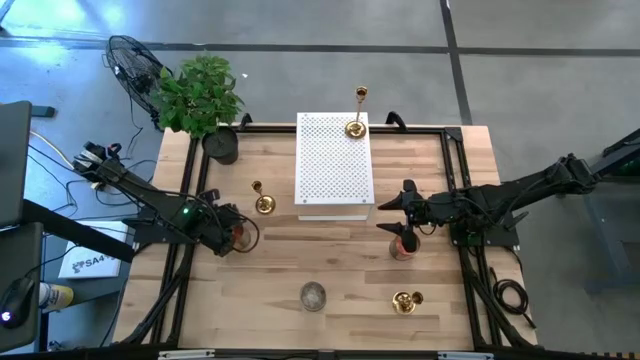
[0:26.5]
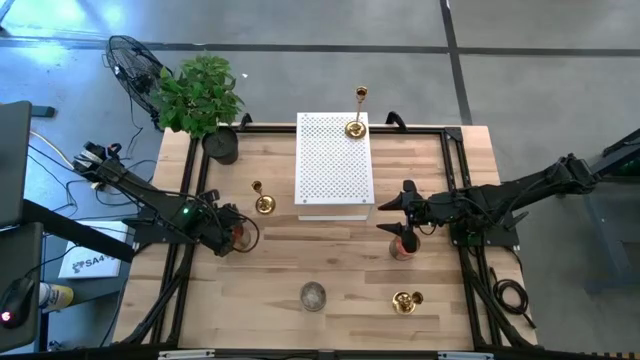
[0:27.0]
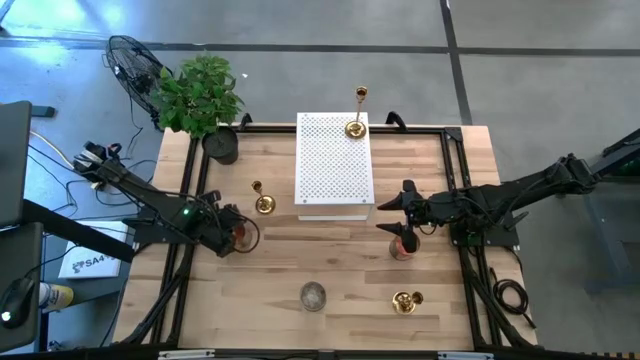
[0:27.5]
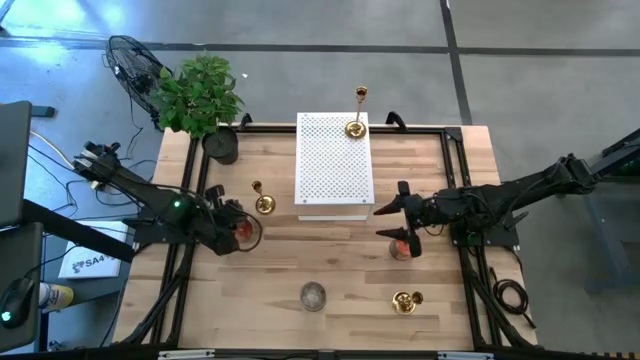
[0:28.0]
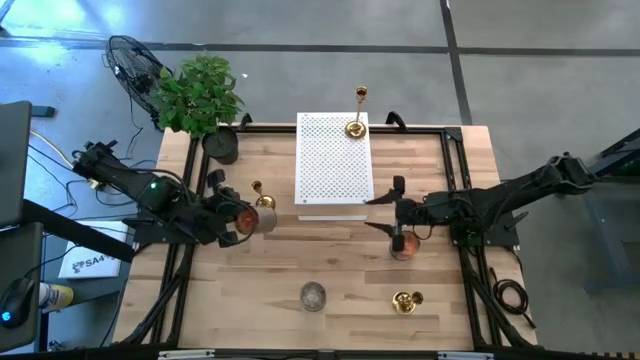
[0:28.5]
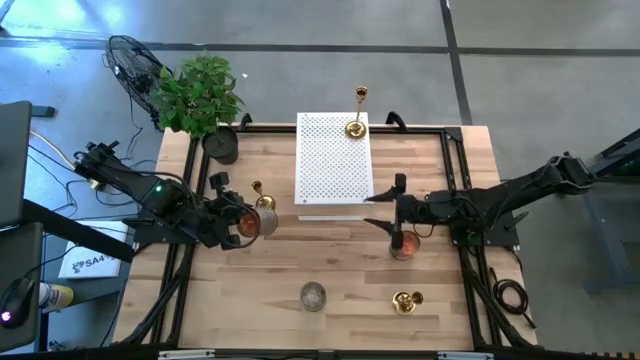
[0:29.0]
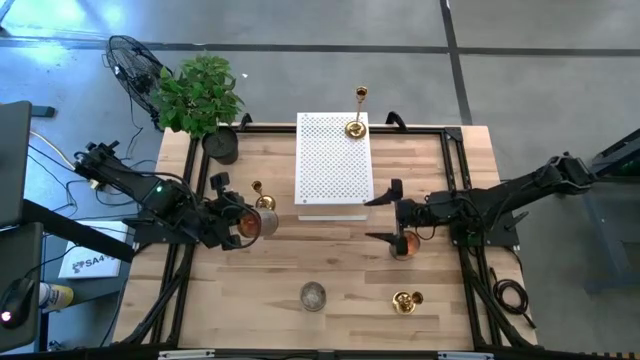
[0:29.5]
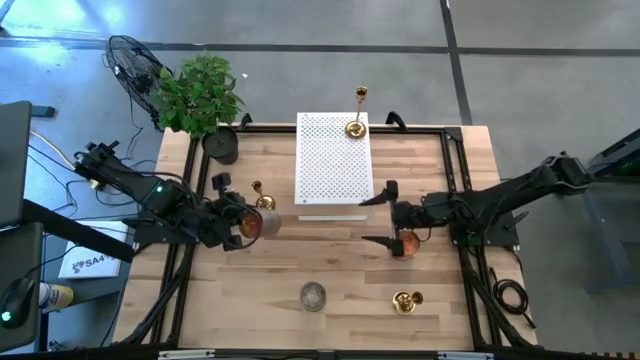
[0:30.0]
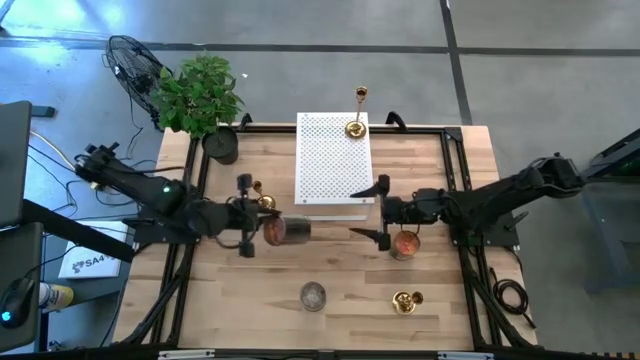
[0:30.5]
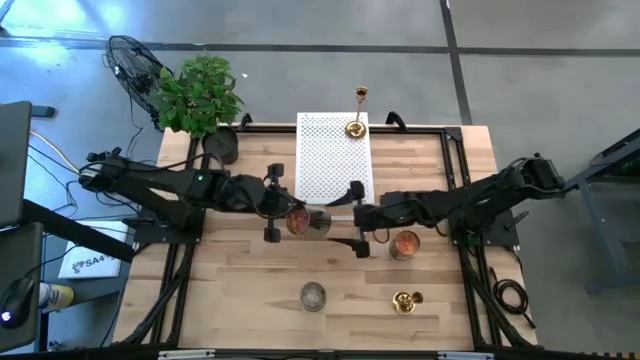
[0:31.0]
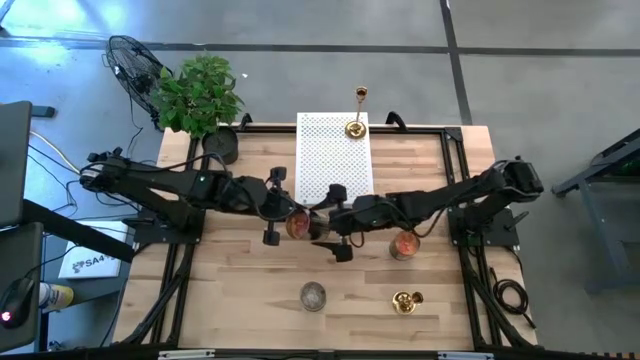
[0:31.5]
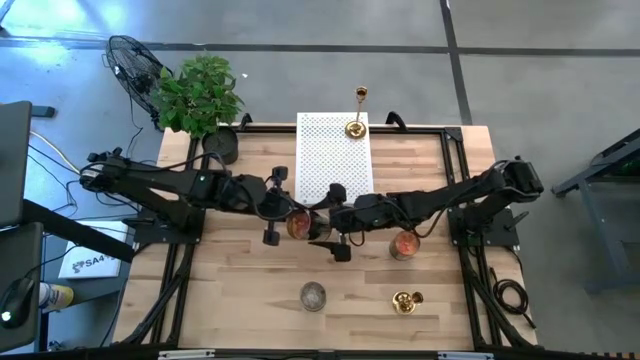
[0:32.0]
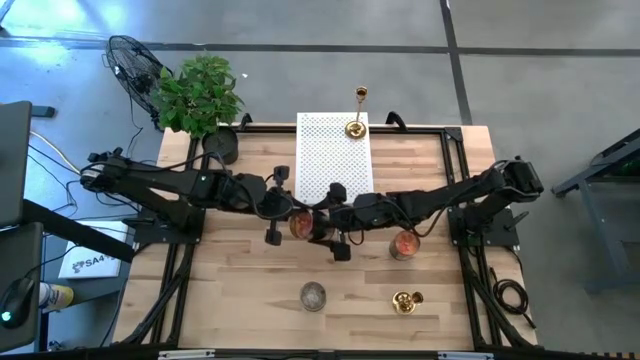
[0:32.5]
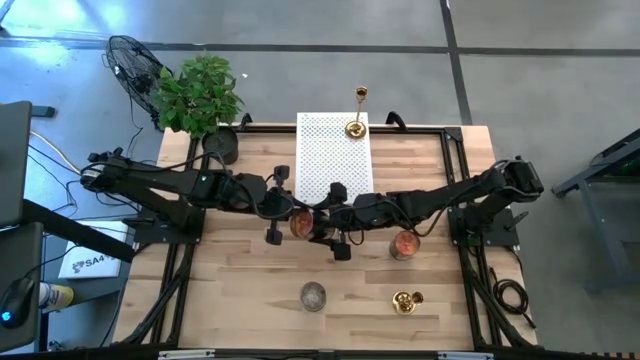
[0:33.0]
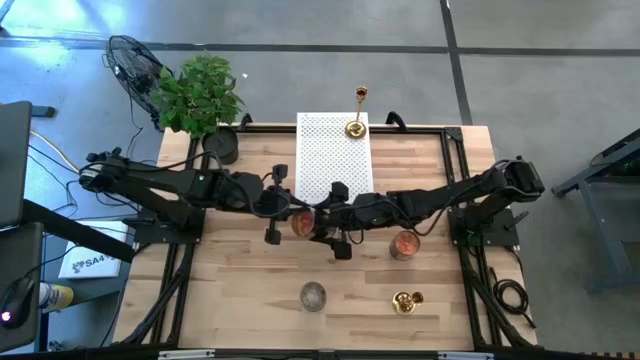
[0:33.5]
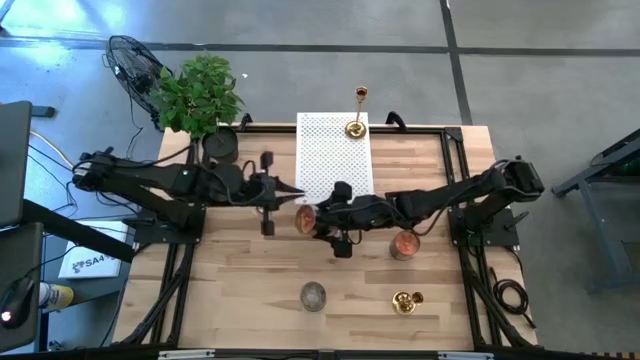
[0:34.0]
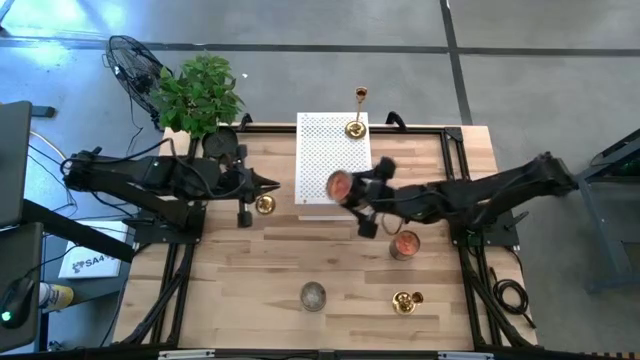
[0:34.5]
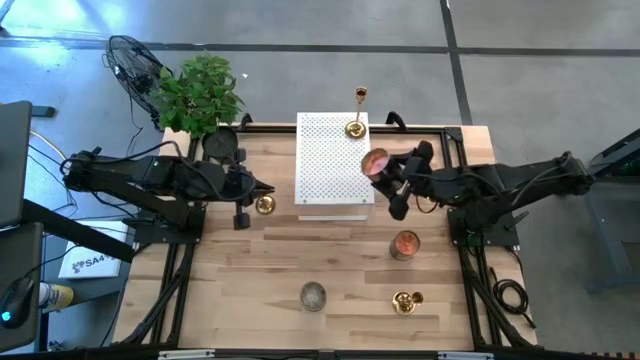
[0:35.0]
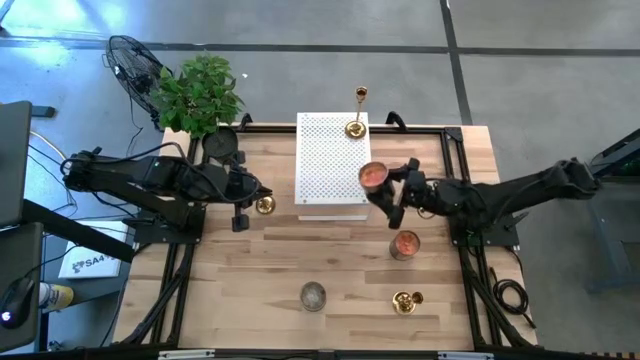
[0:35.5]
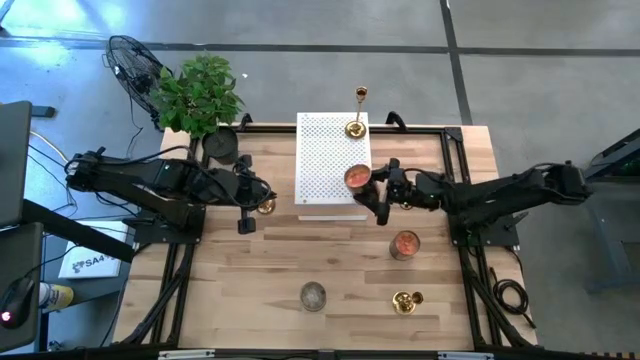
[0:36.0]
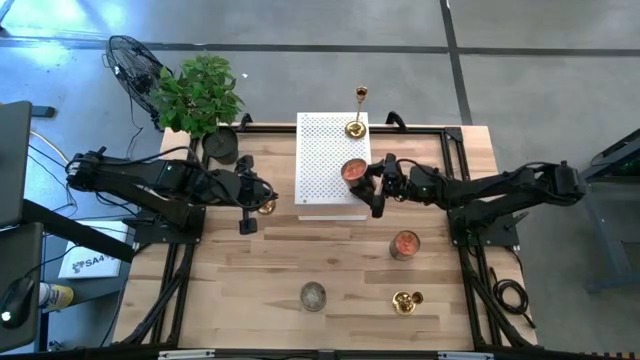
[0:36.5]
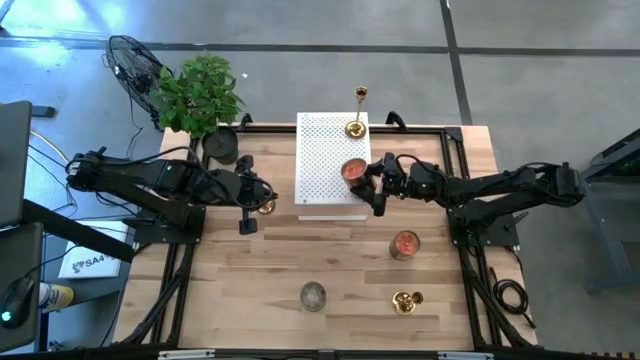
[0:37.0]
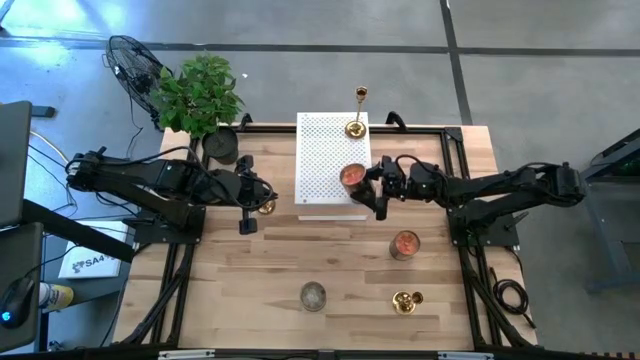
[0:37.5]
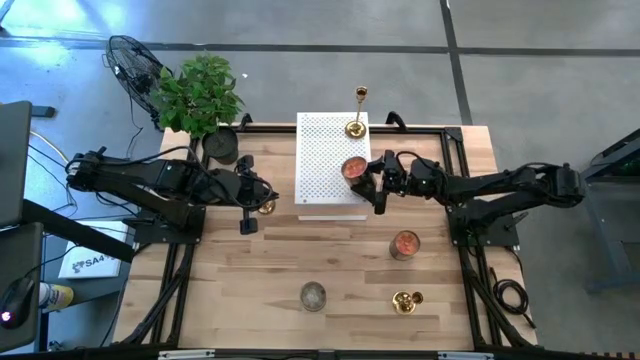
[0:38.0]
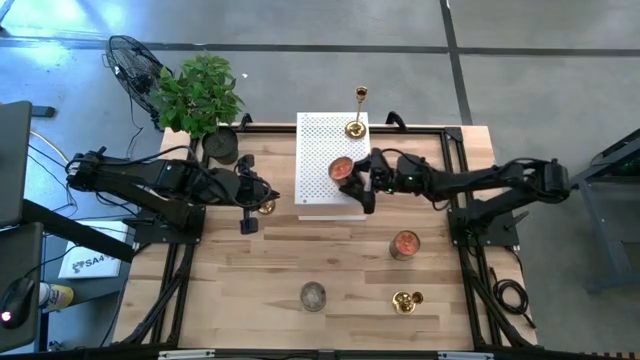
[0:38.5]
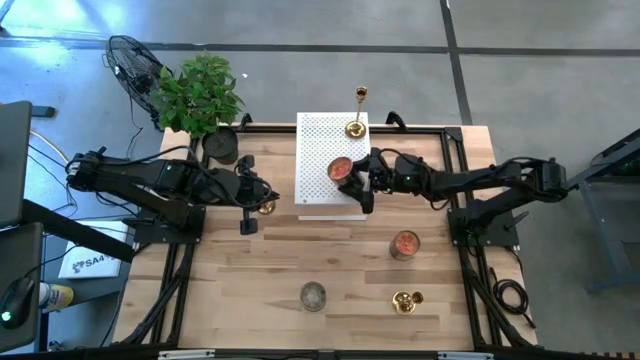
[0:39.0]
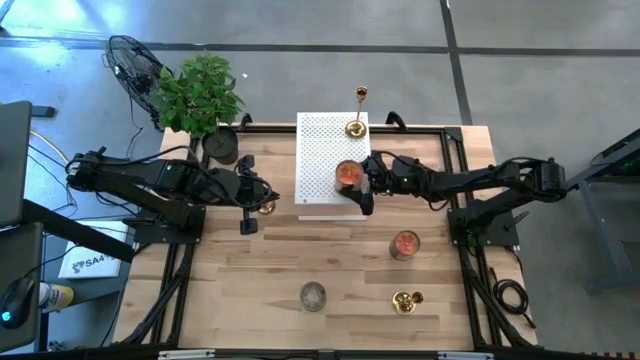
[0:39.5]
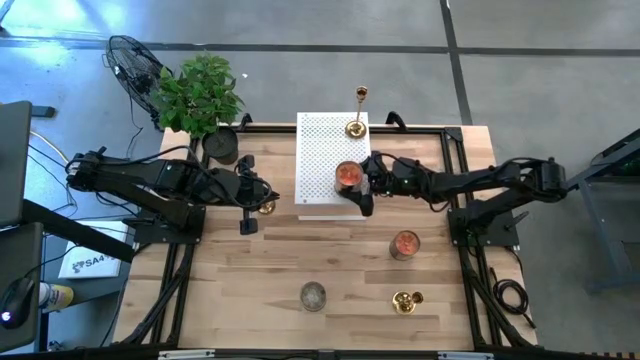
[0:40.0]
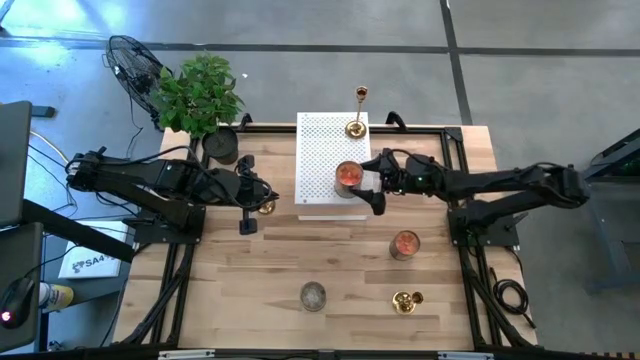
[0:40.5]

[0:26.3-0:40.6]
Task: Pick & Place candle stick holders
Put the left orange scented candle on the shelf

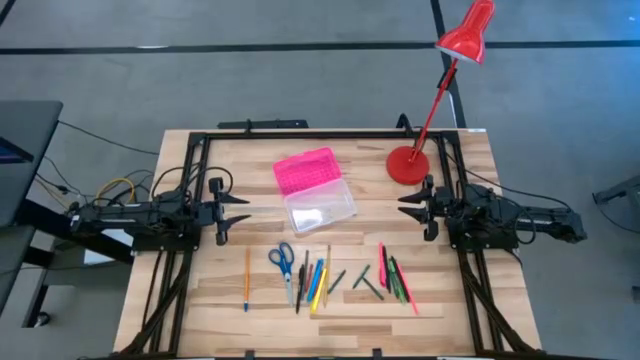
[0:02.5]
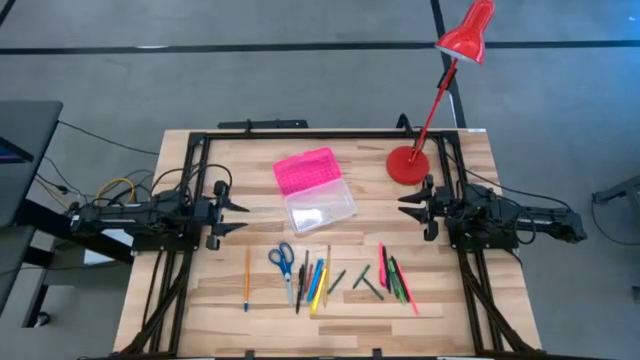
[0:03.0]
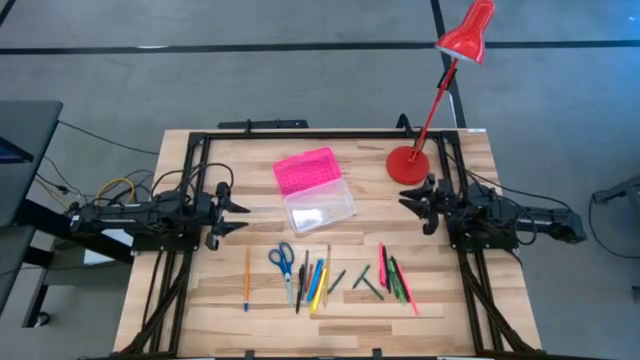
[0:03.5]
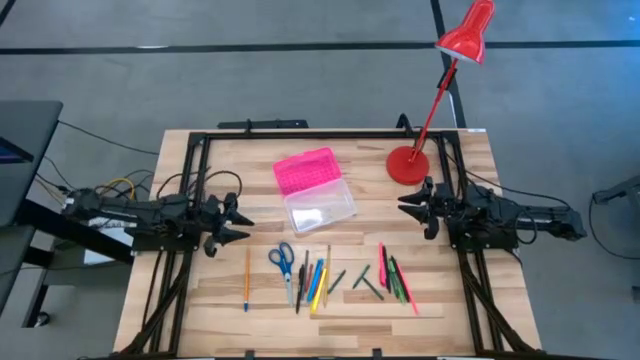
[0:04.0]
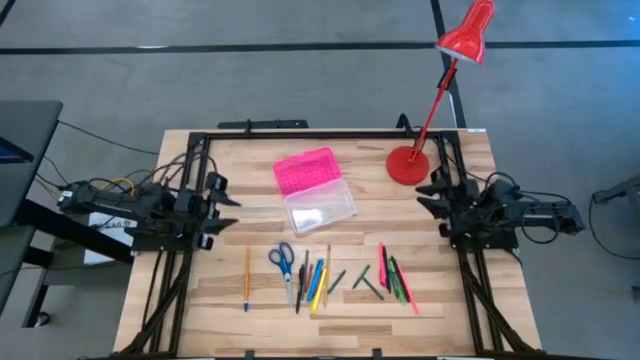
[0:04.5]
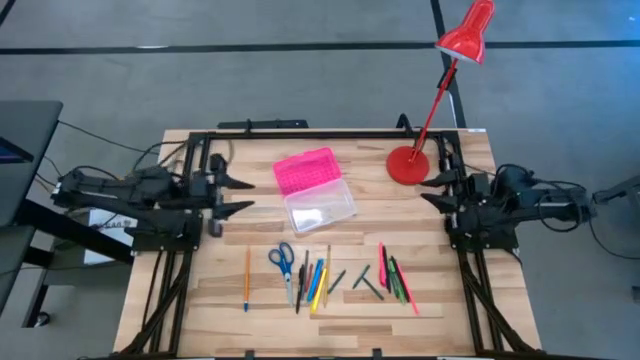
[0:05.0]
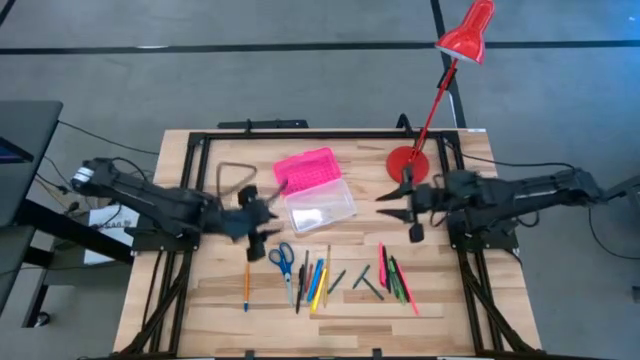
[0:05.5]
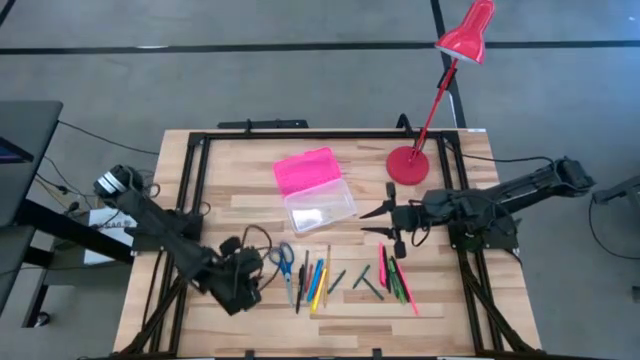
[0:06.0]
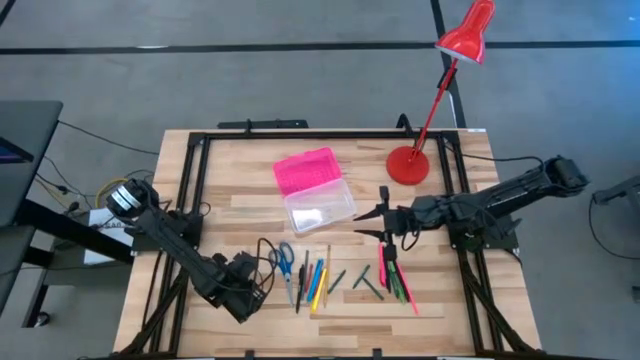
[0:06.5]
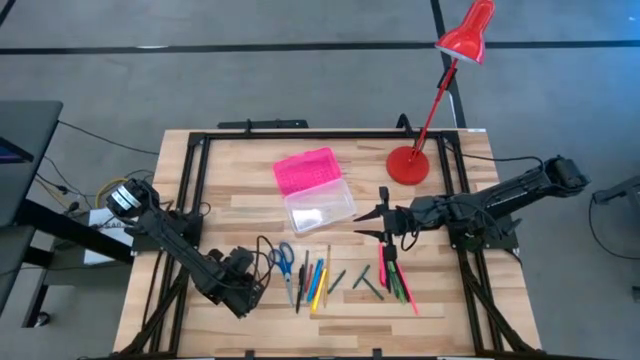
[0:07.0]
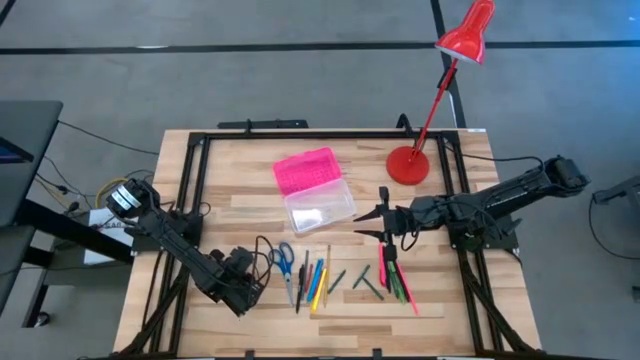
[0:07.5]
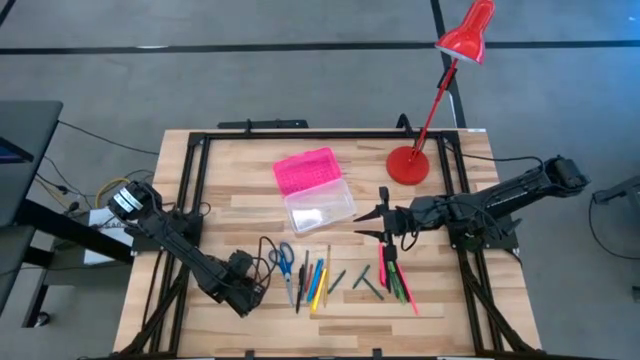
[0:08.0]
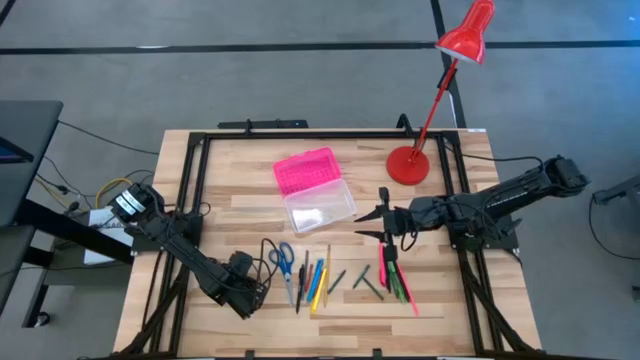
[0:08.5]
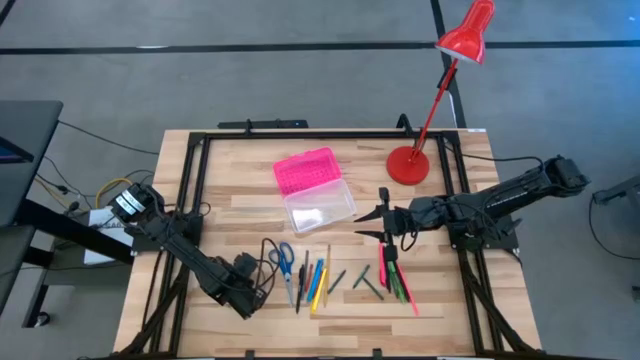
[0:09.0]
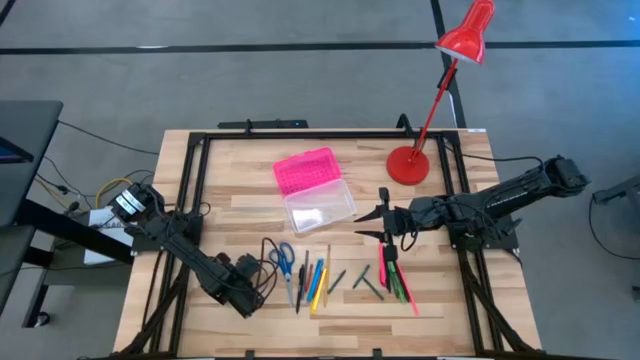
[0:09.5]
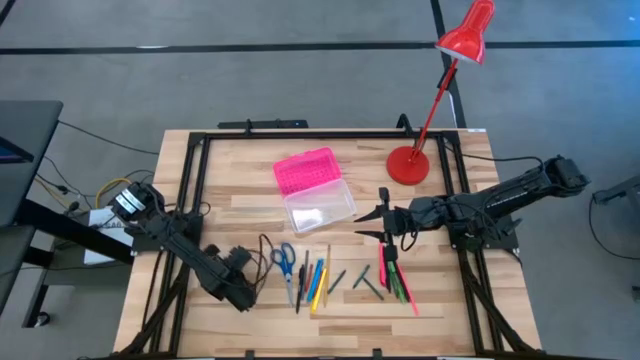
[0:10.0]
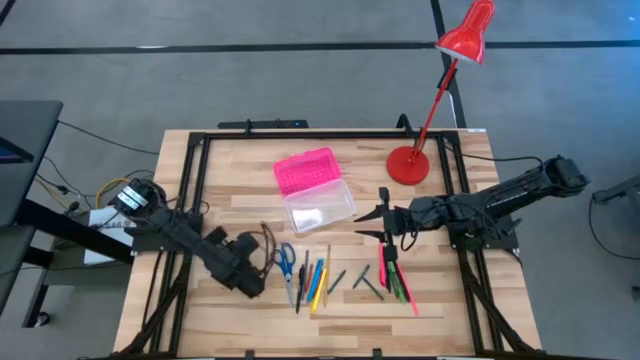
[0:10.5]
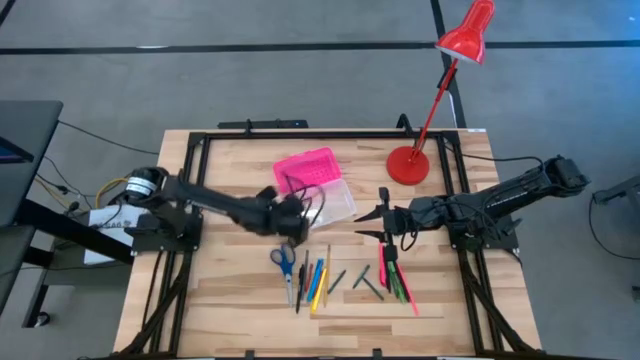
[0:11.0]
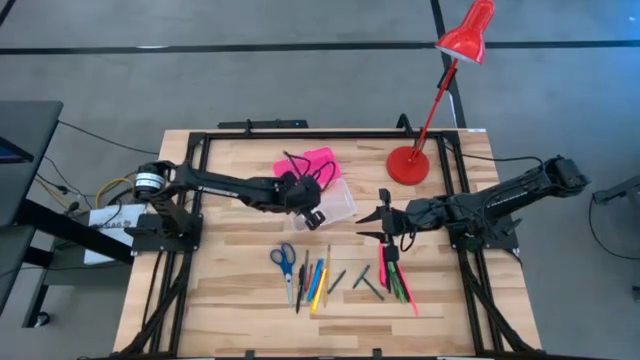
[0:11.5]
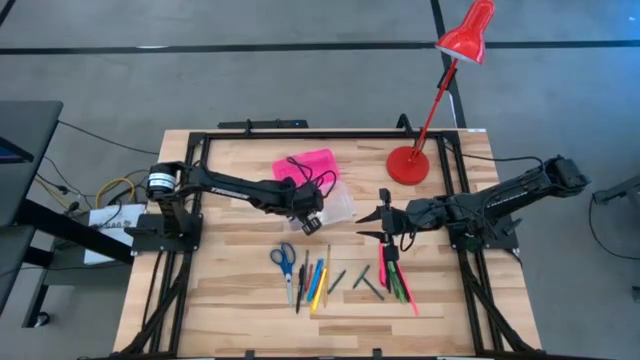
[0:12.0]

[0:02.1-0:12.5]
Task: Pick & place school supplies into a supply box
Put the orange pencil into the pink supply box
